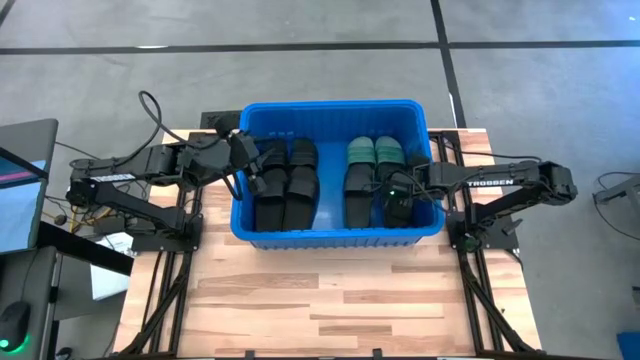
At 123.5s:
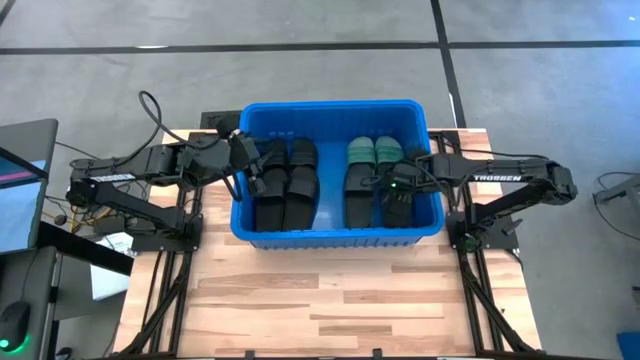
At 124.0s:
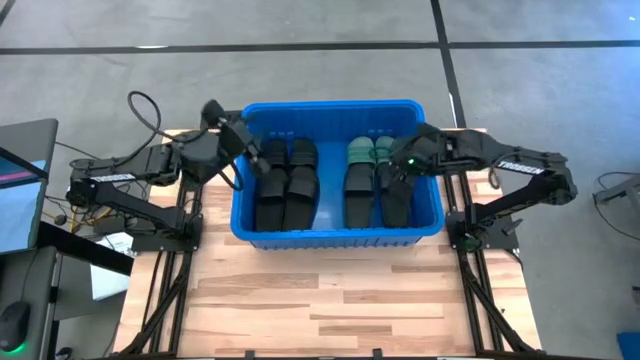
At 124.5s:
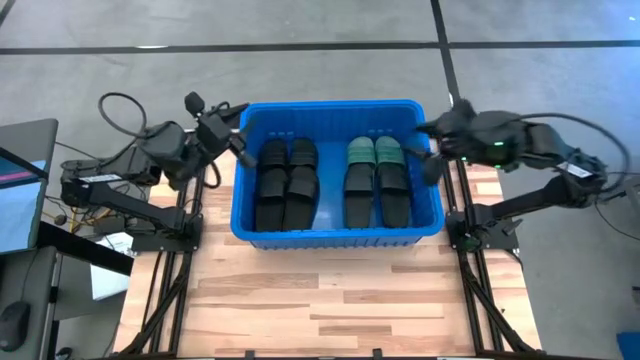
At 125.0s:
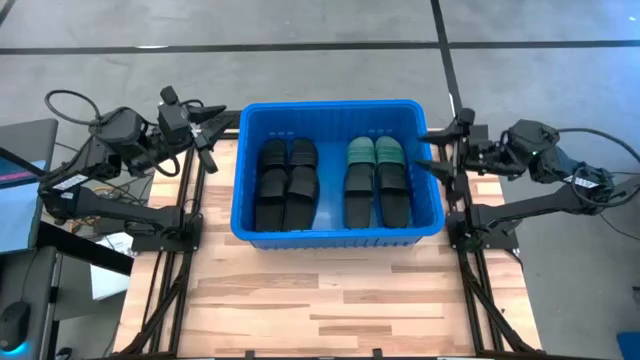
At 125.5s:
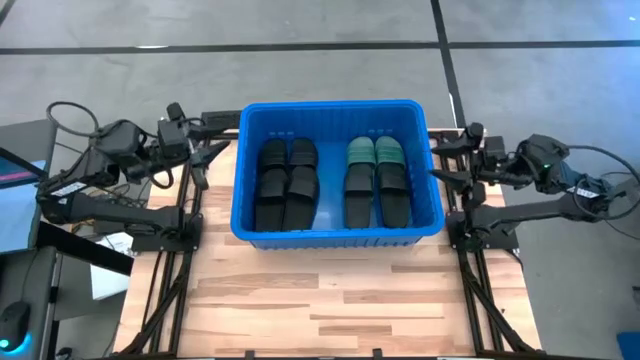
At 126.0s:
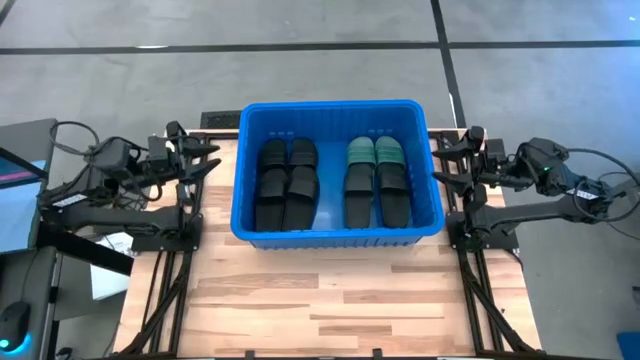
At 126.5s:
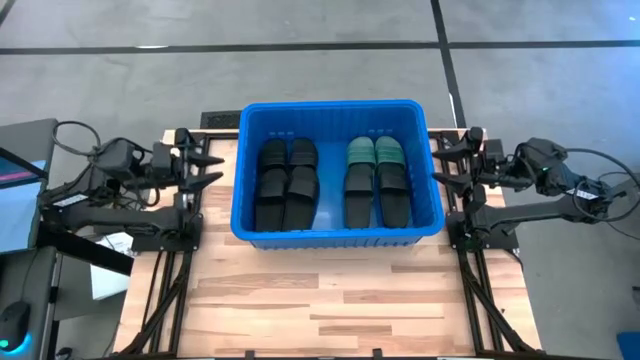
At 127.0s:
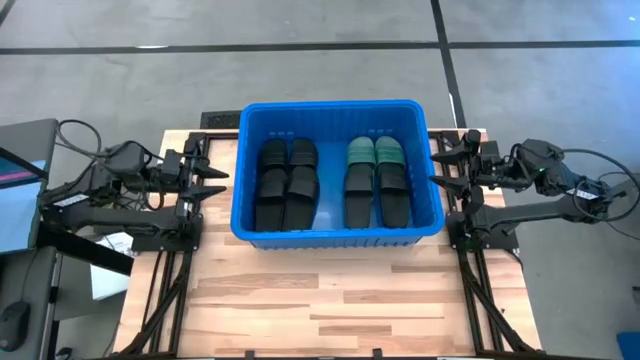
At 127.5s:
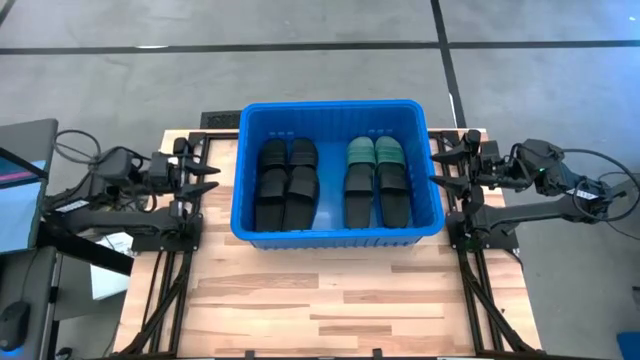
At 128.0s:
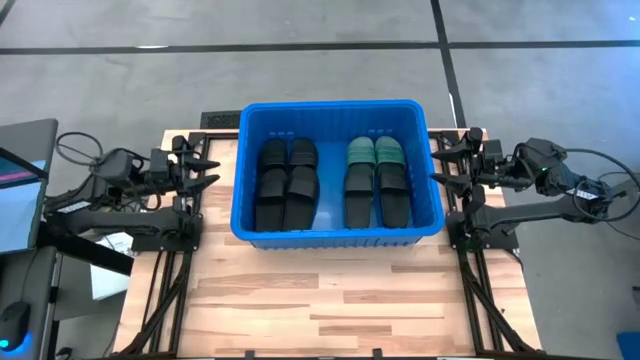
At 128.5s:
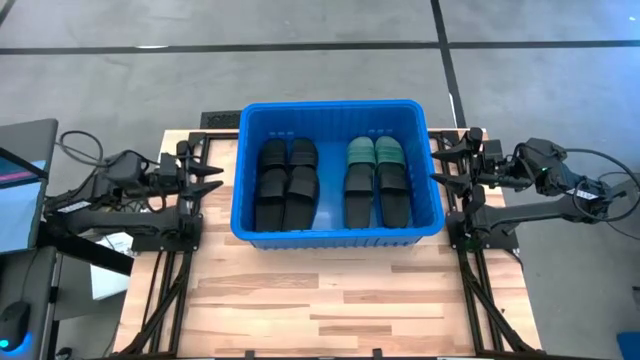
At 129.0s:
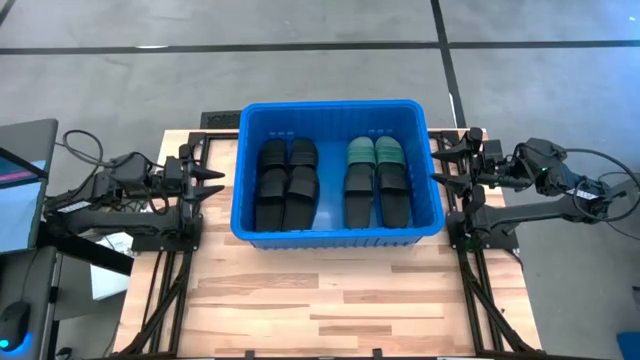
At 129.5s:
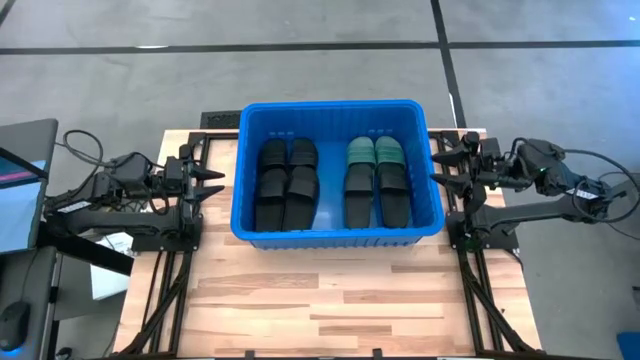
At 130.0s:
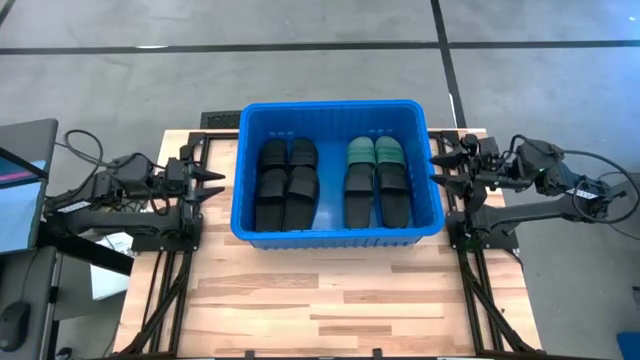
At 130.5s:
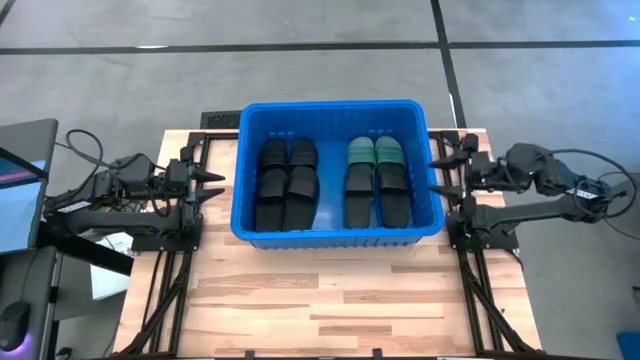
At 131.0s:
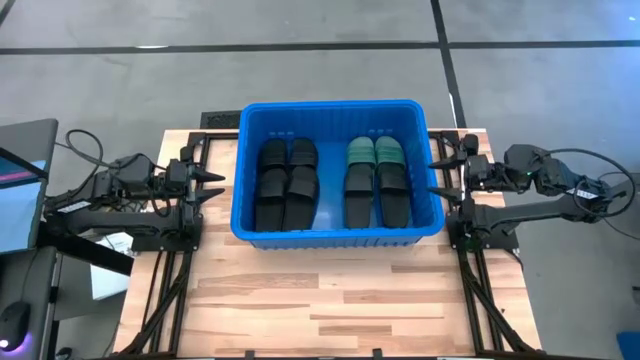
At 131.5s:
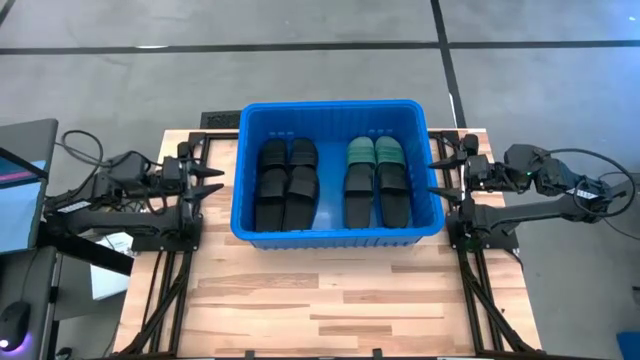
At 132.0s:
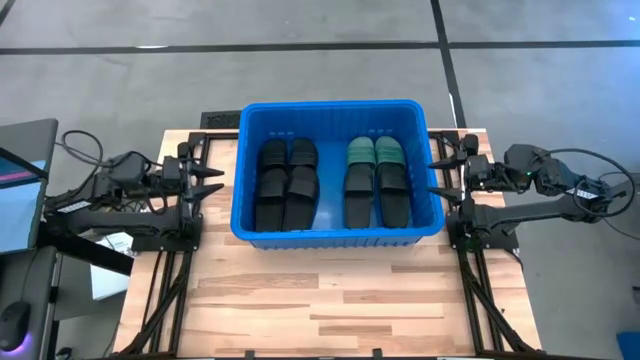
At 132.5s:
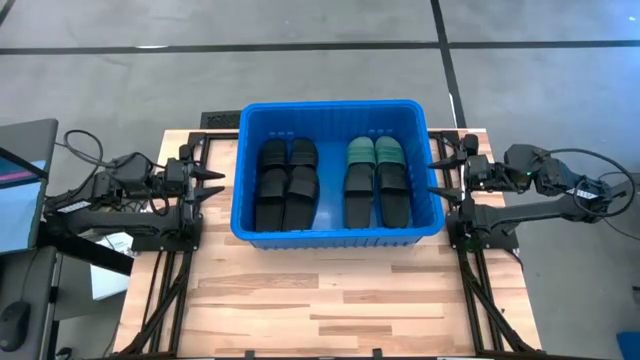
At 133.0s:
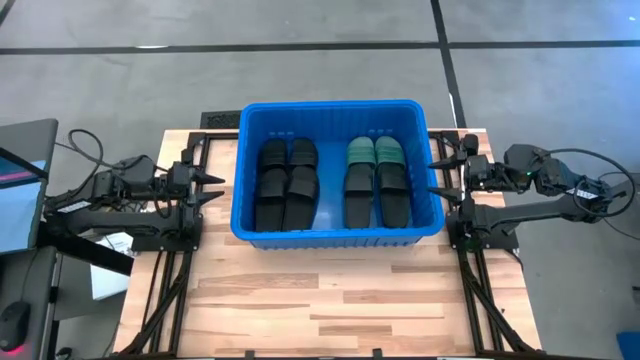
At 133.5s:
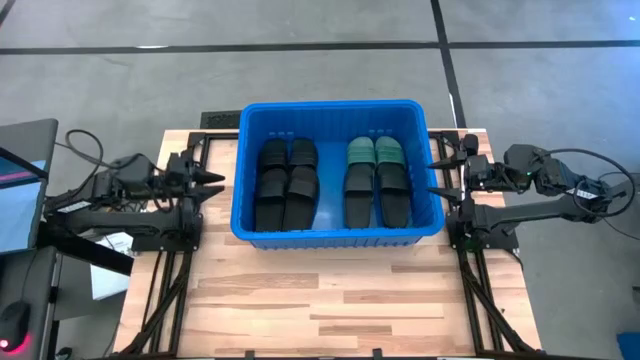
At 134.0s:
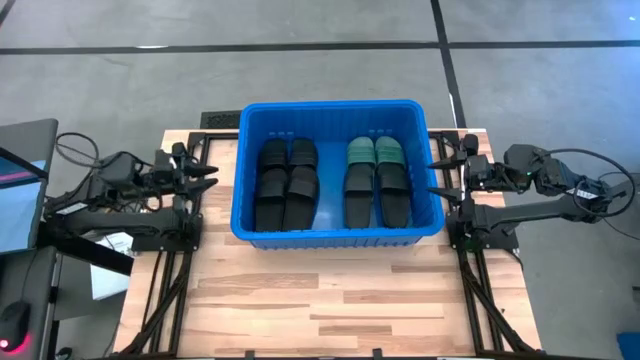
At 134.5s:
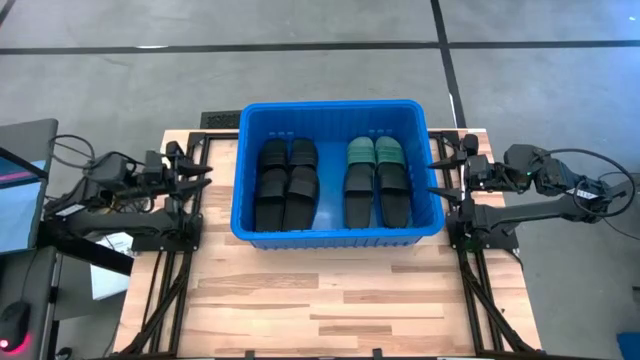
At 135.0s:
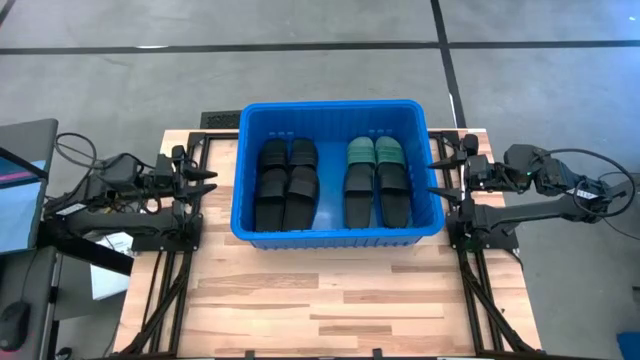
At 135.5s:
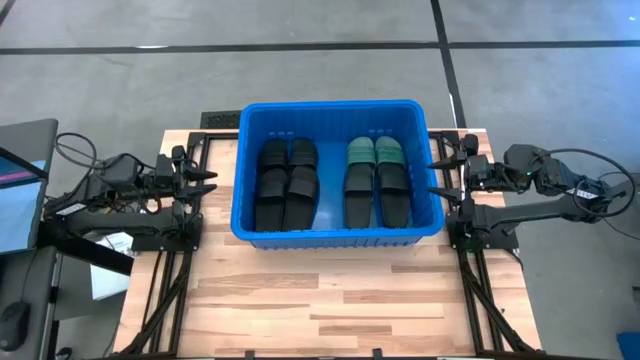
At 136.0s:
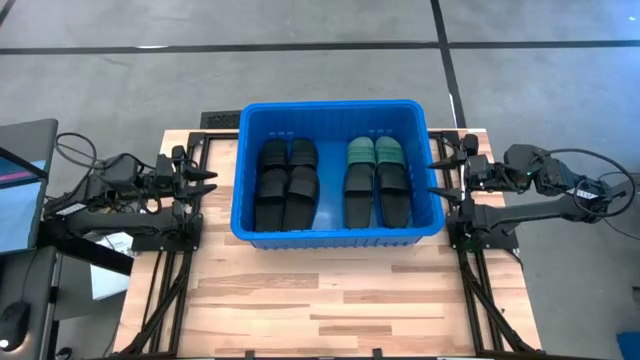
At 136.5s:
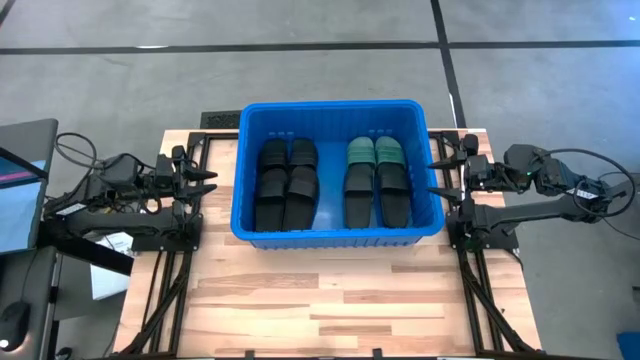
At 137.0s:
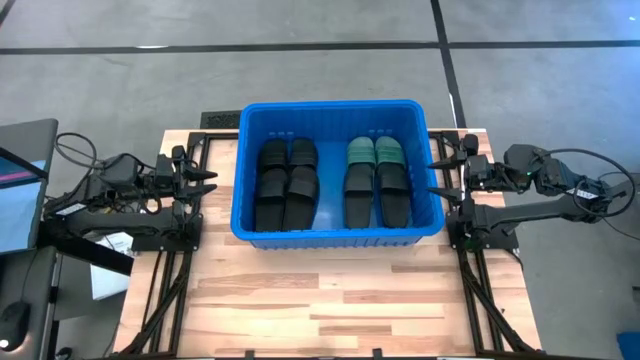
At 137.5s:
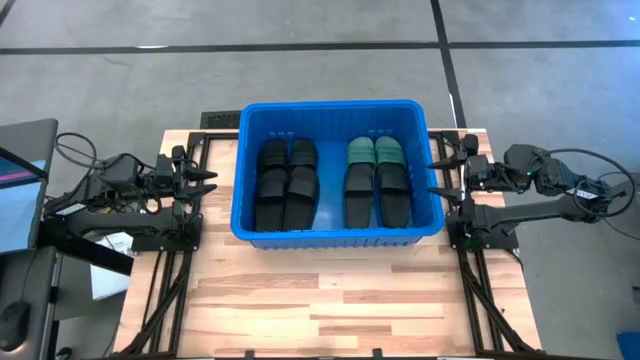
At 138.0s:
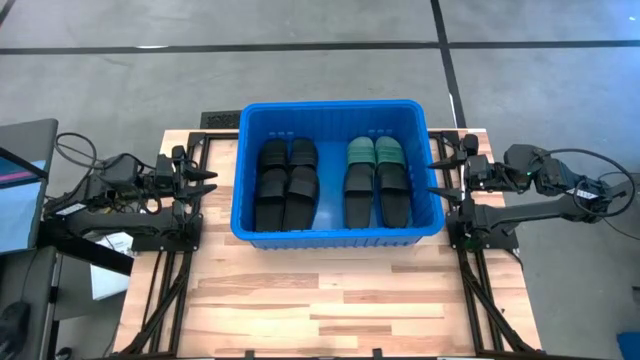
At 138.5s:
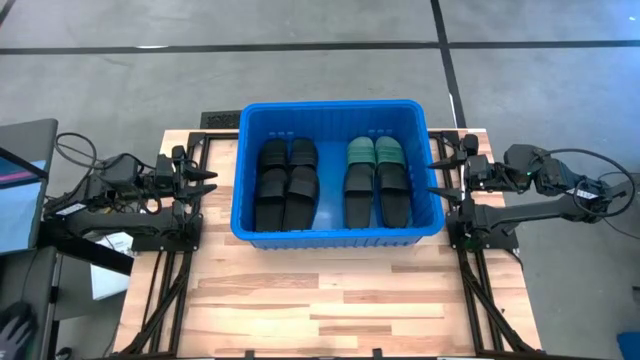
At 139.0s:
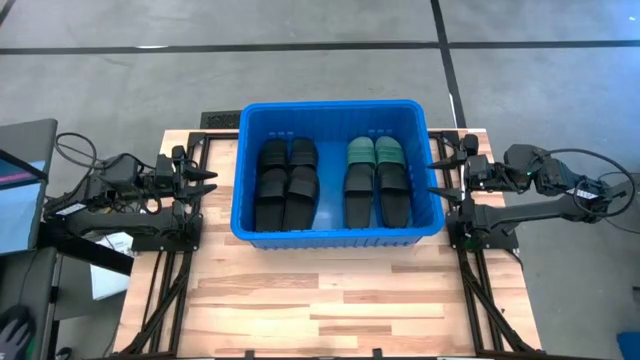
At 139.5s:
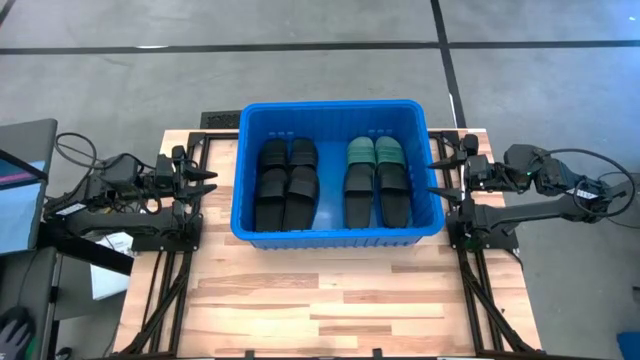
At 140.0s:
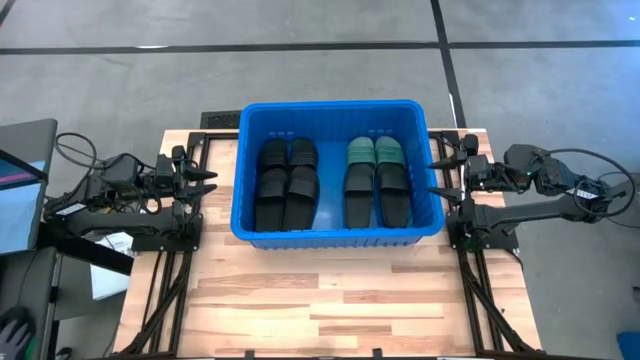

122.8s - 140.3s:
Task: Pick and place slides into bin
Return to Home Position

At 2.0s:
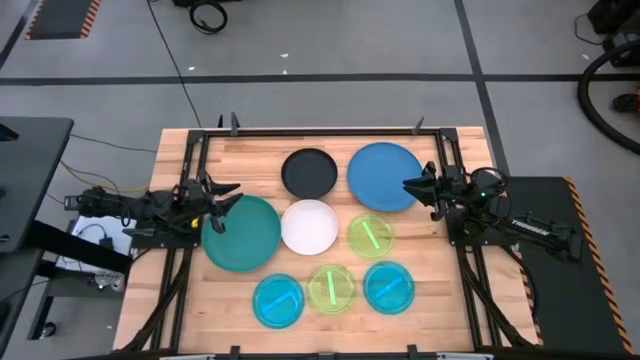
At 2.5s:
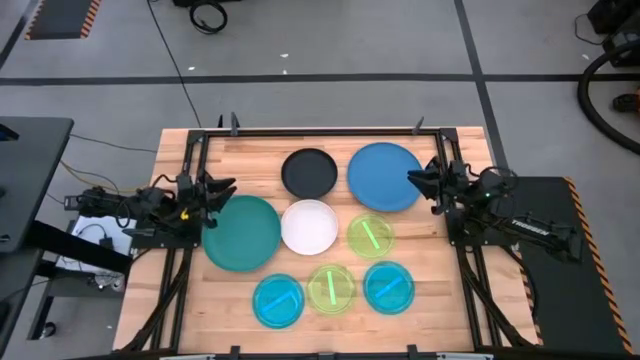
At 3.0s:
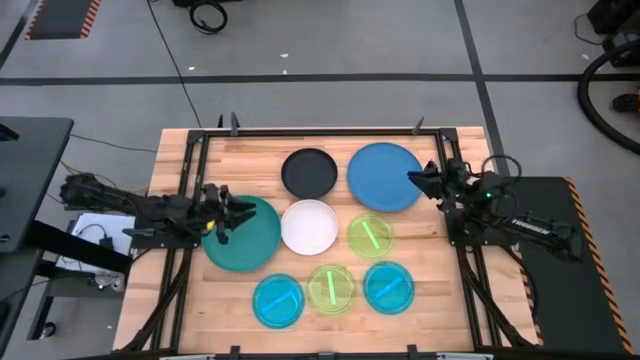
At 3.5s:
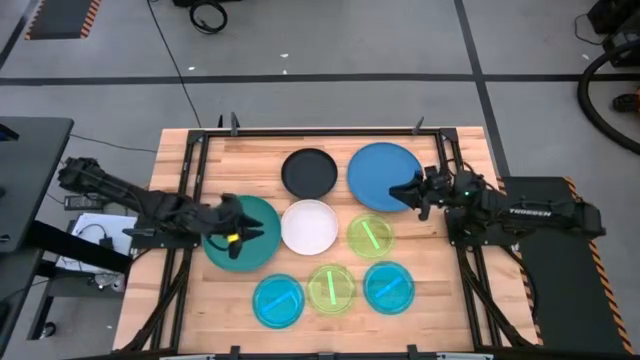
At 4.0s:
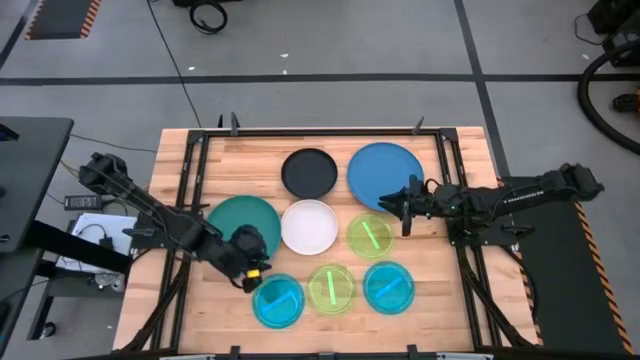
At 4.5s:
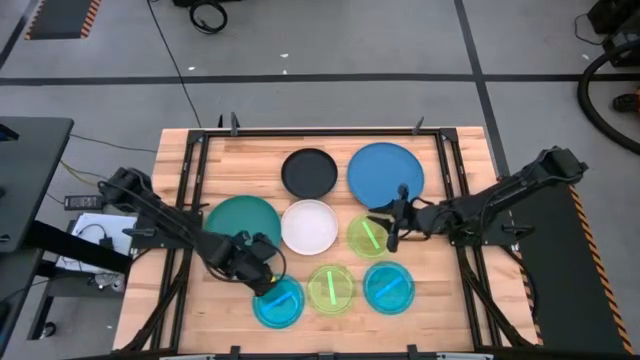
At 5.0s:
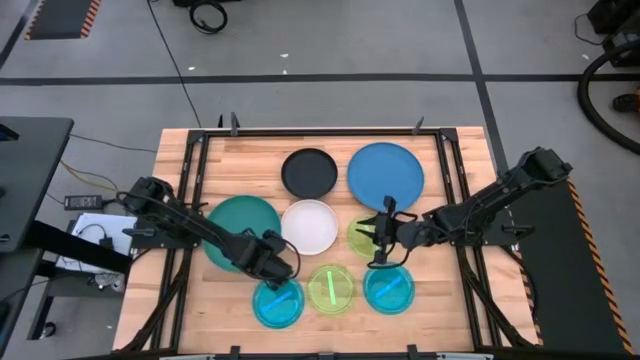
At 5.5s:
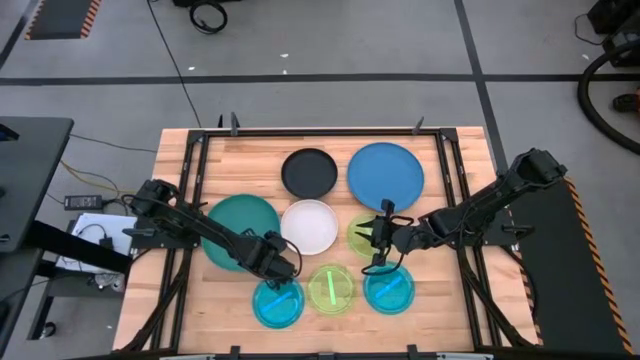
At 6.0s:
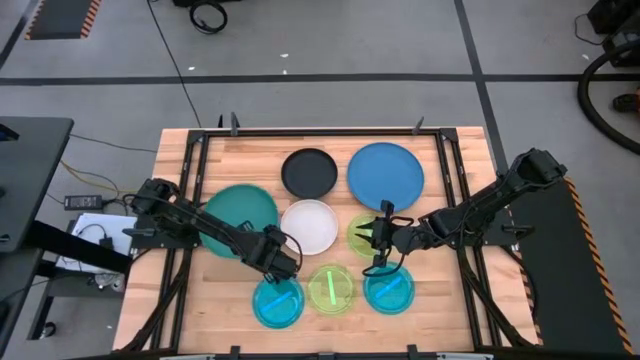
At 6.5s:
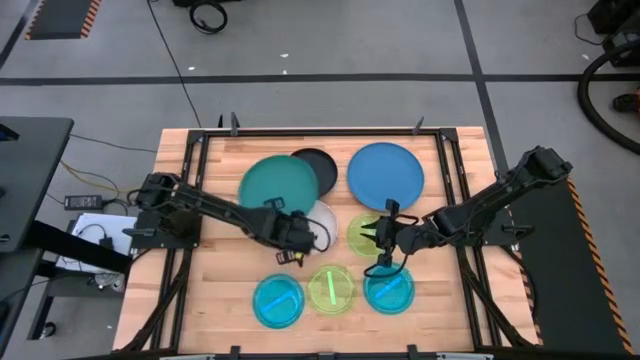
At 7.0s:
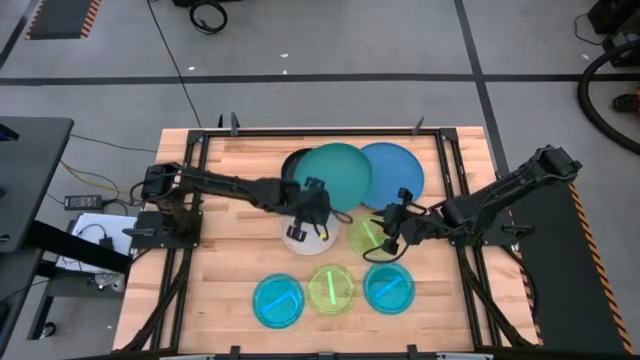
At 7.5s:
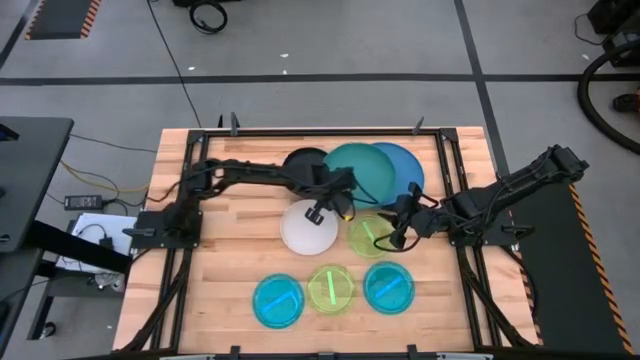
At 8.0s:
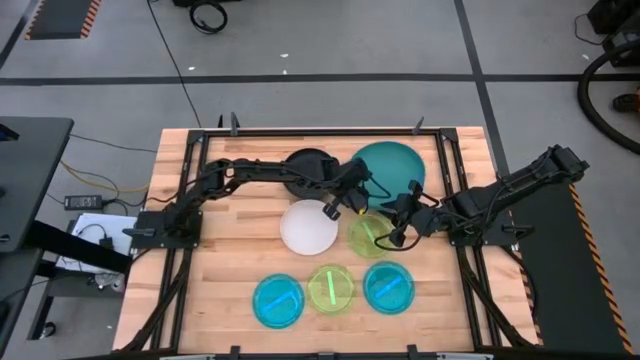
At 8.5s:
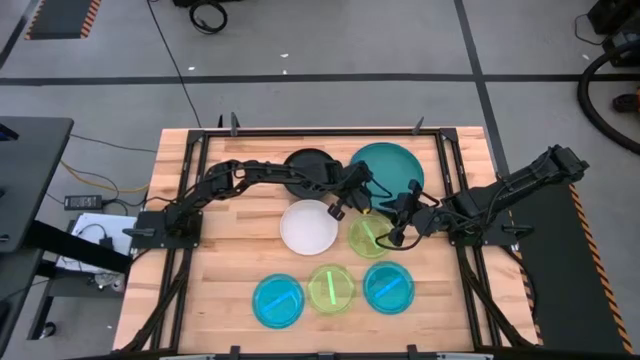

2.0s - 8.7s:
Task: Stack plastic plates
Stack the green plate on the blue plate
